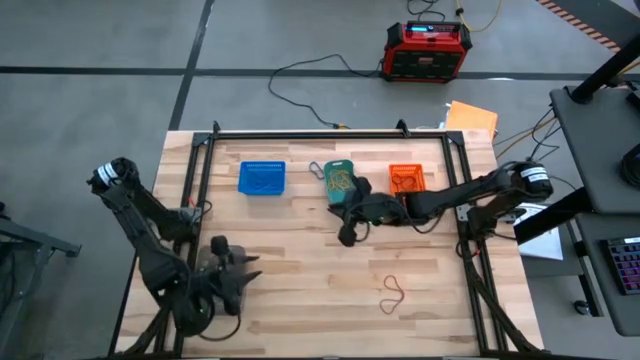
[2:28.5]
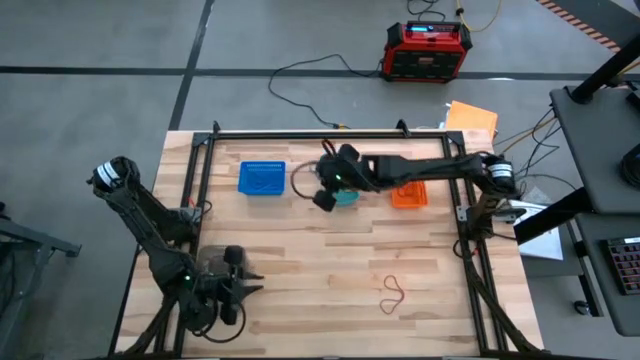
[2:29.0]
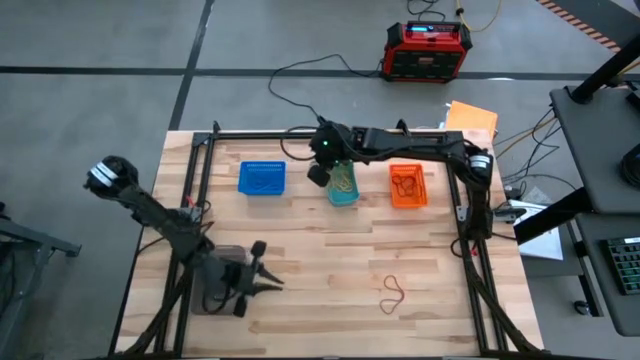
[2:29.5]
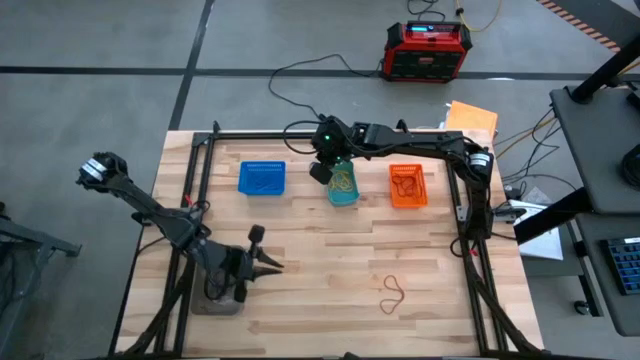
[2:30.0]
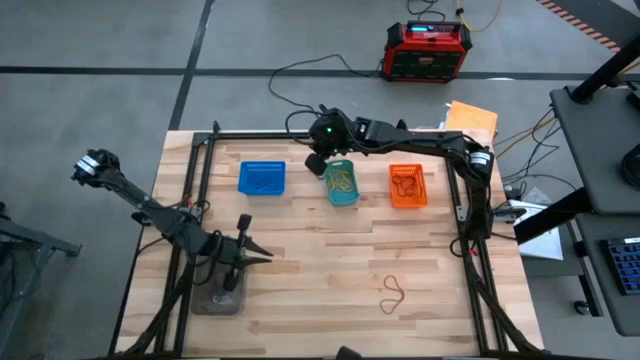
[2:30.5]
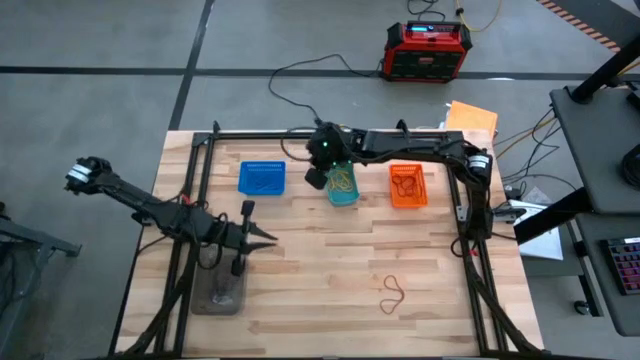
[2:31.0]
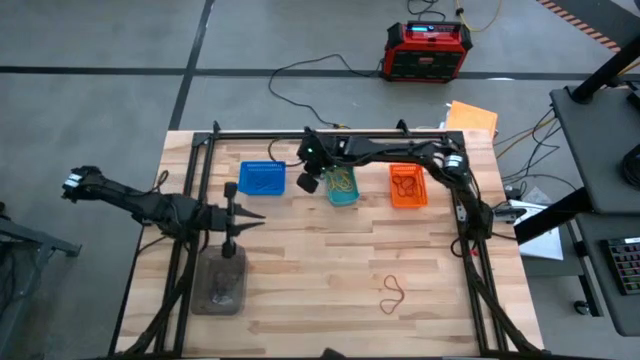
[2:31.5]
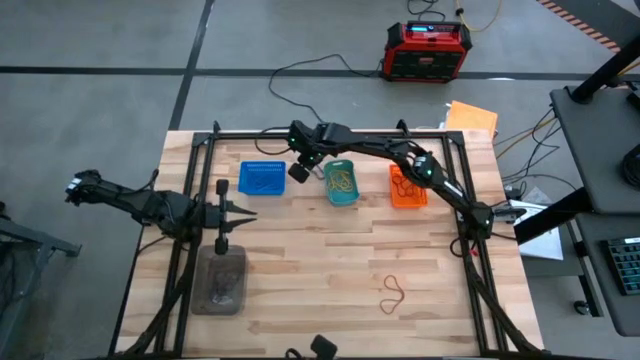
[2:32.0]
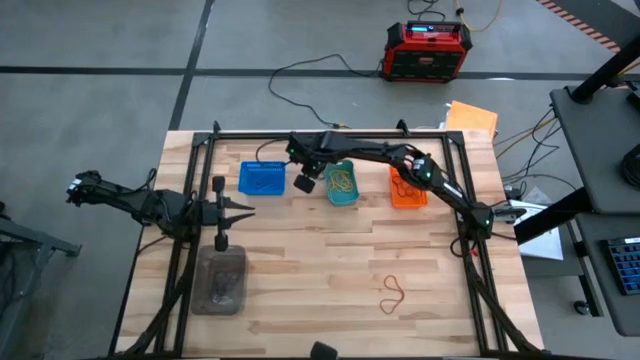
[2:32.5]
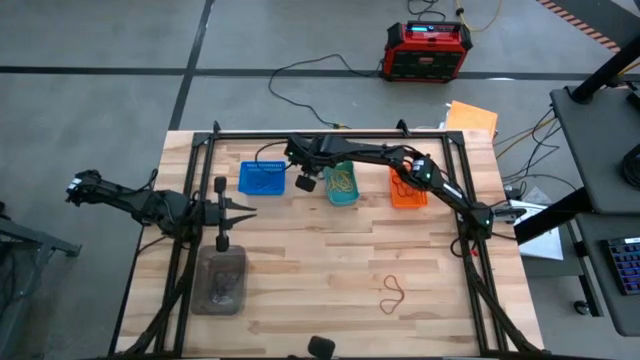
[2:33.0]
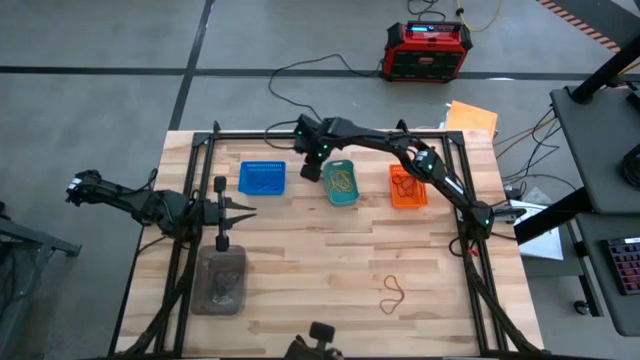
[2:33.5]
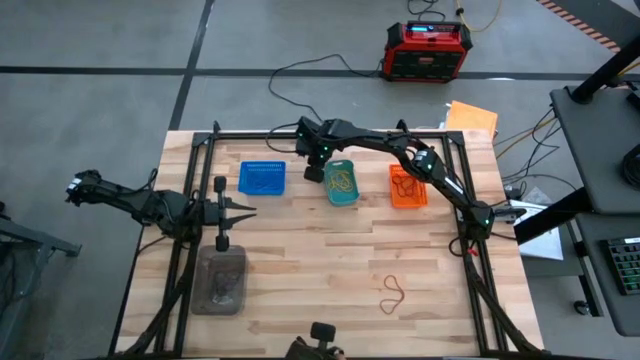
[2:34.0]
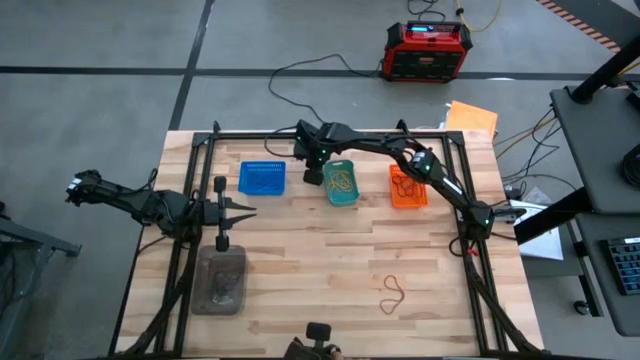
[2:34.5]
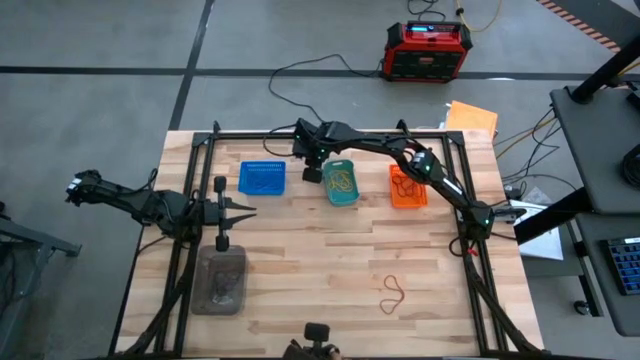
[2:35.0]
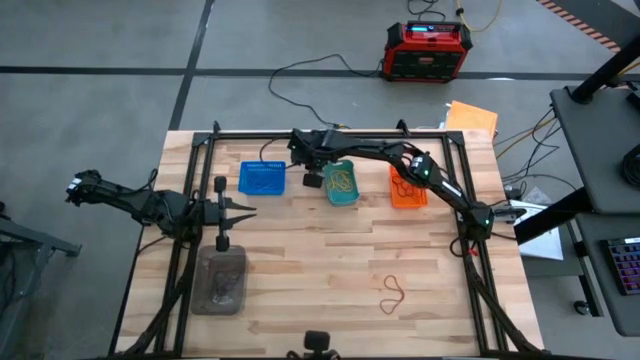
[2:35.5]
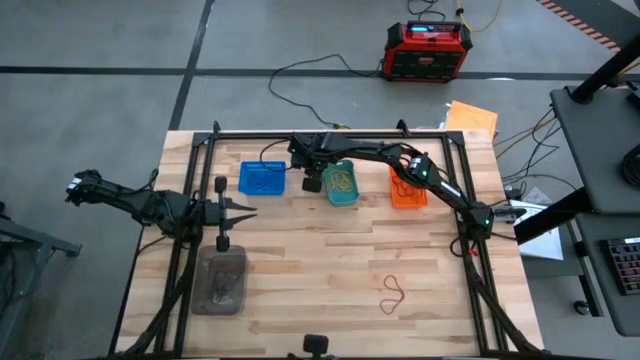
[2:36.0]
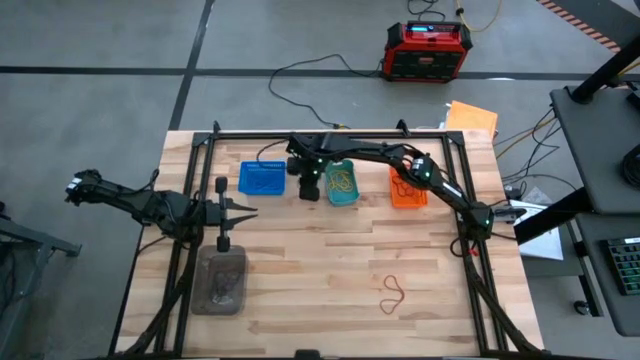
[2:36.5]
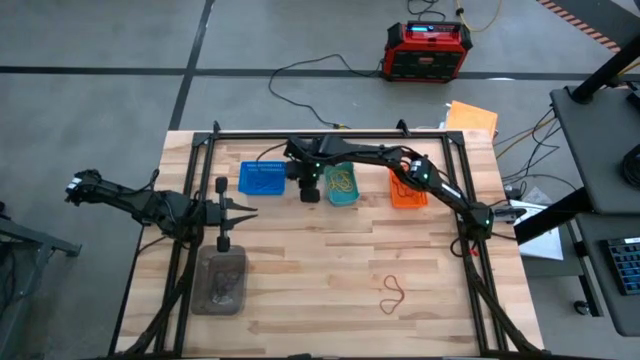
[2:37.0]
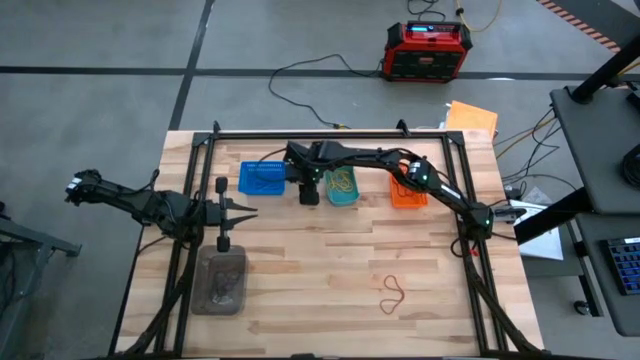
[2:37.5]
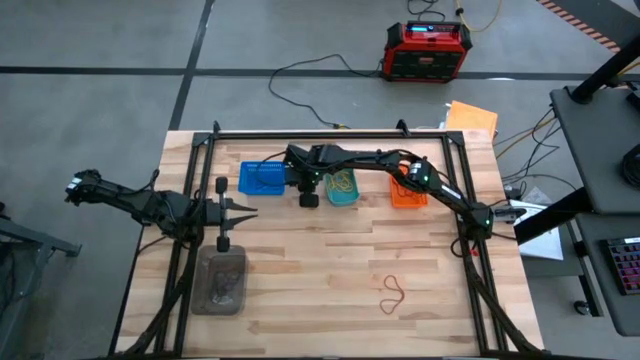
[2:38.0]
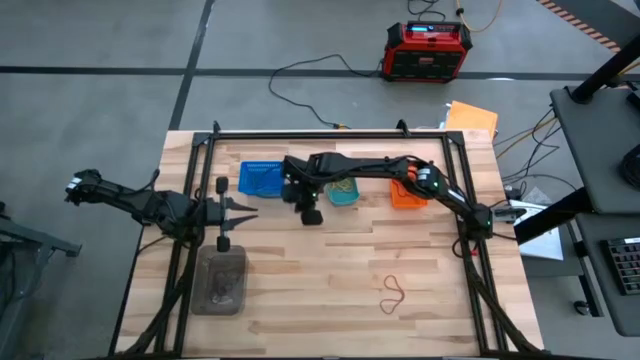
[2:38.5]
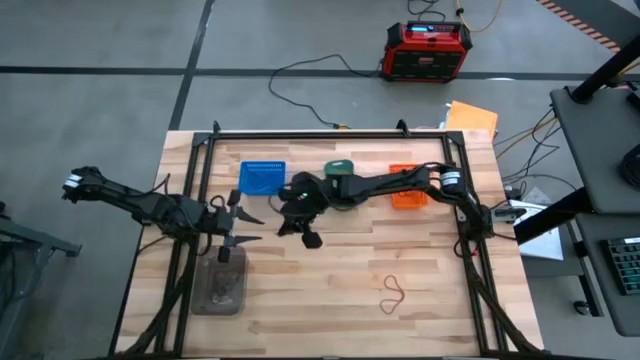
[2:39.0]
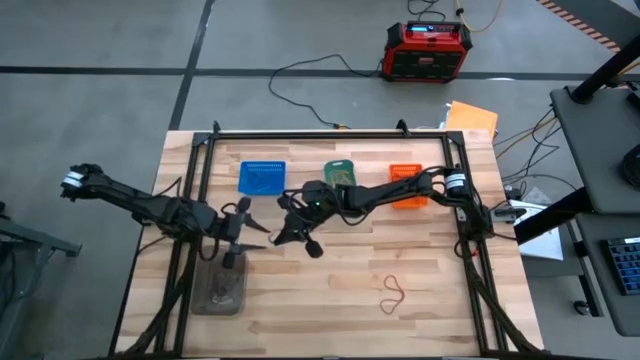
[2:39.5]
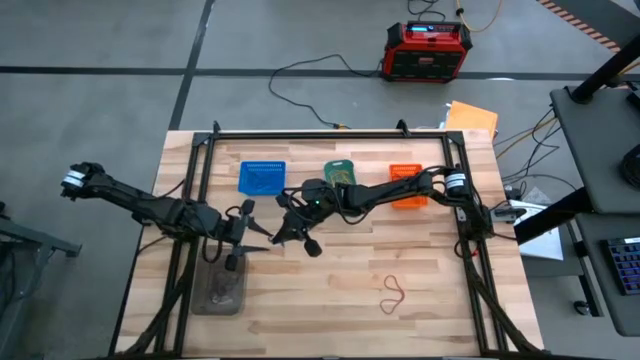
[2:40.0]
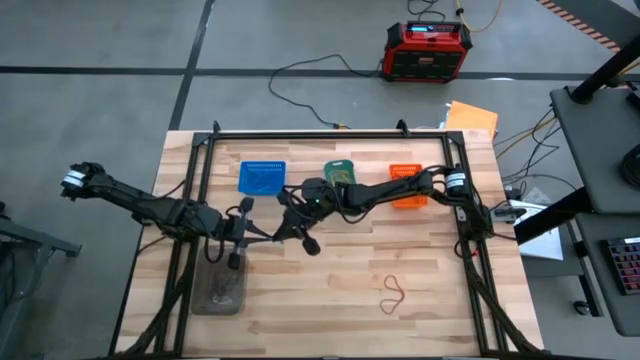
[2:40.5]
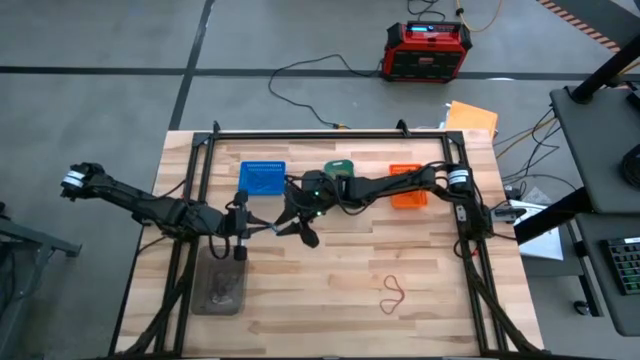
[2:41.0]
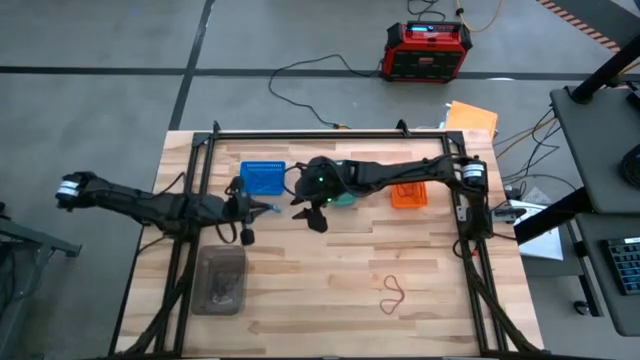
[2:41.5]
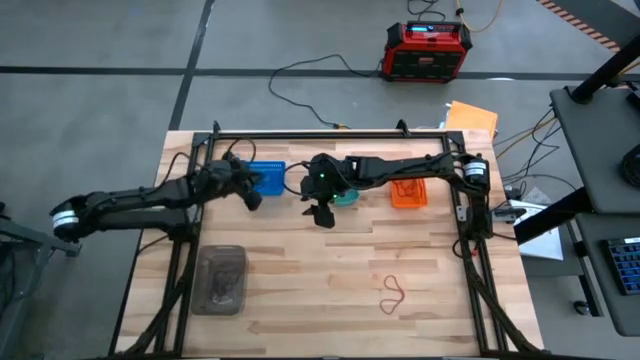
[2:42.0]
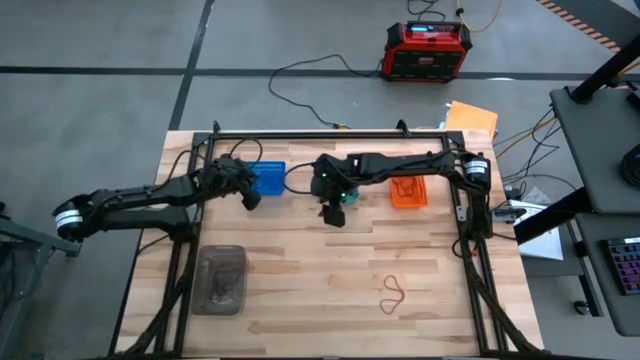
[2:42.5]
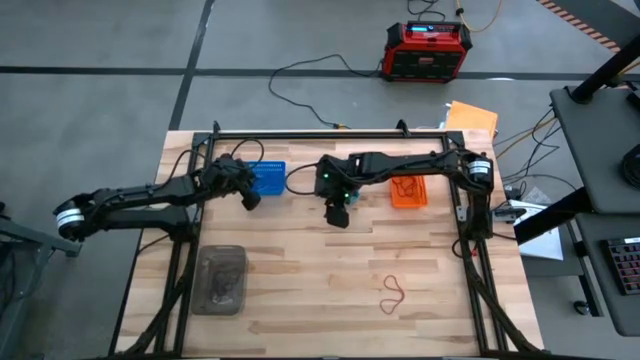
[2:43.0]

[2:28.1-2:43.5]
Task: Sort rubber bands into baskets
Put the top blue rubber band into the blue bin

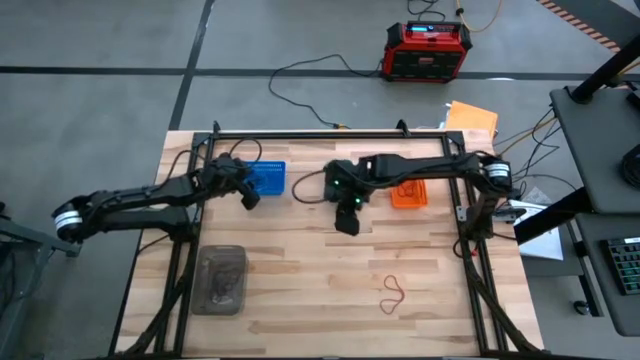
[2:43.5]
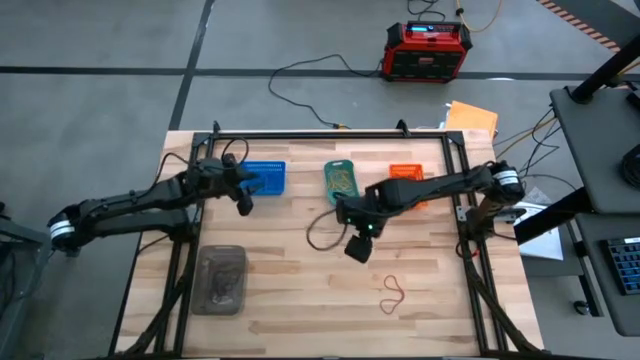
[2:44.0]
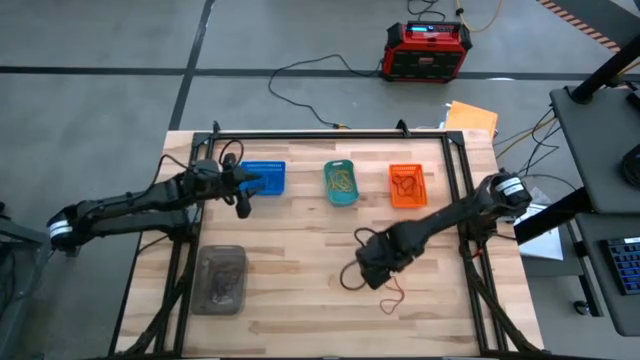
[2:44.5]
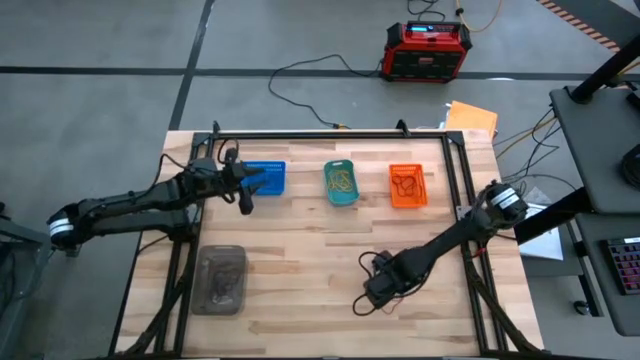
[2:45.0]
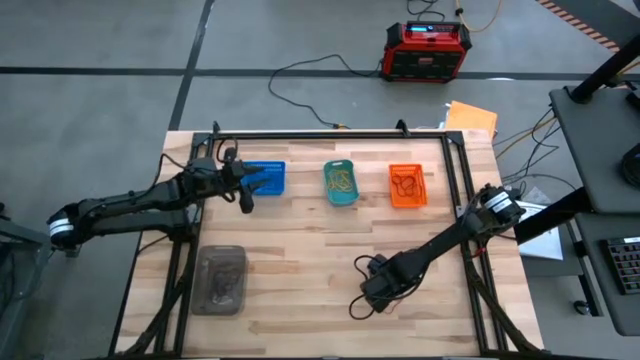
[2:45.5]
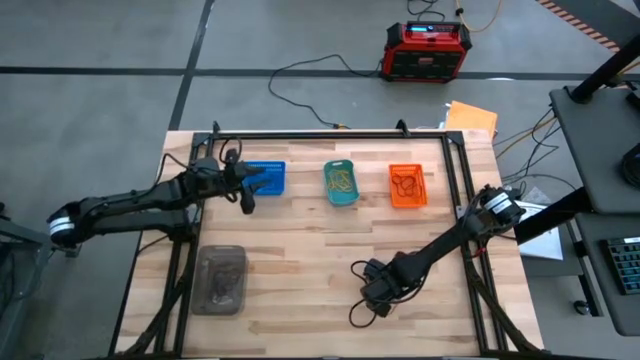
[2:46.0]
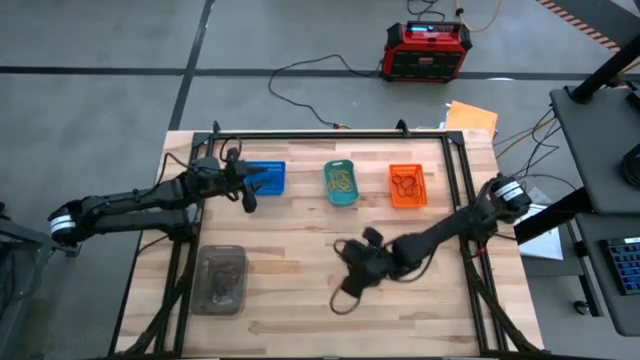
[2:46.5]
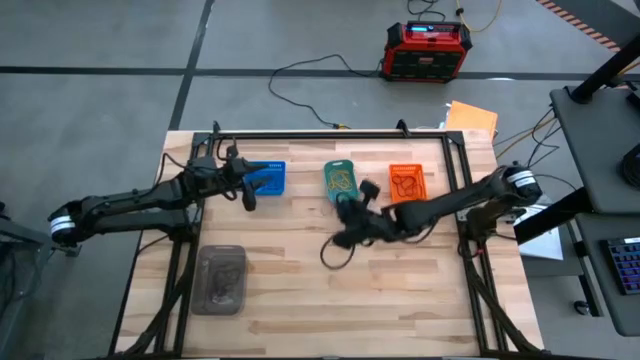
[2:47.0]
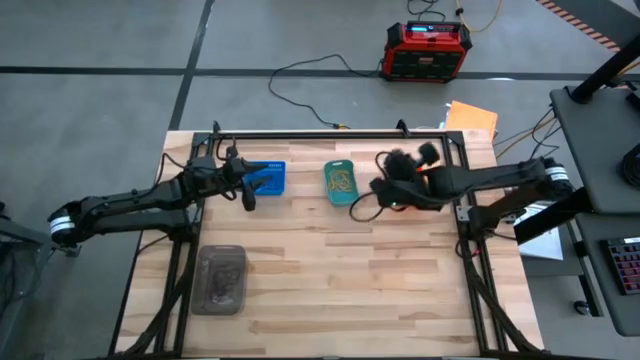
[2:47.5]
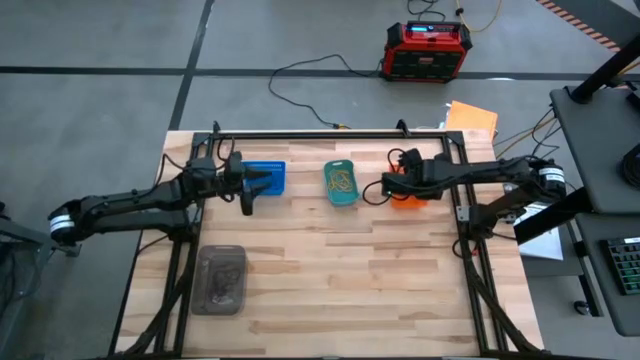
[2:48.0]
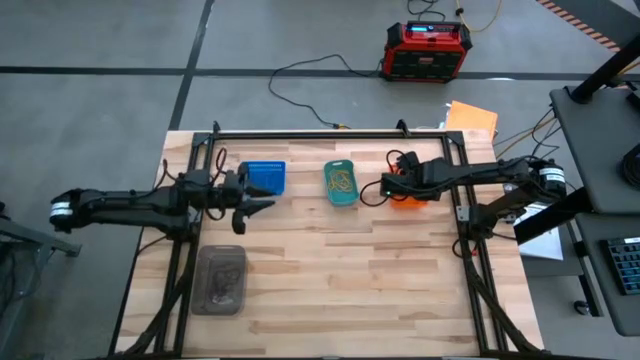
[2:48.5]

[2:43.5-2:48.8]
Put the red rubber band into the orange bin

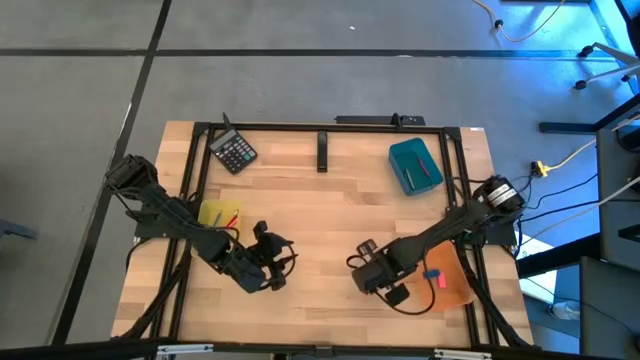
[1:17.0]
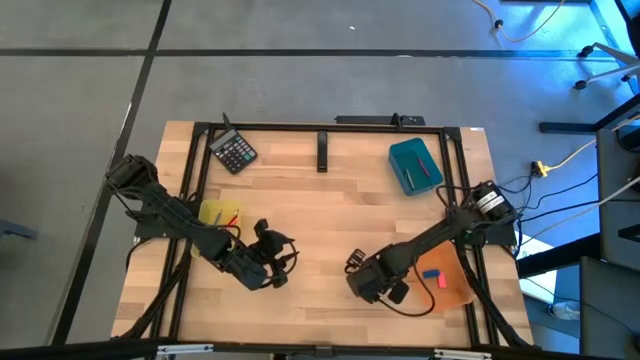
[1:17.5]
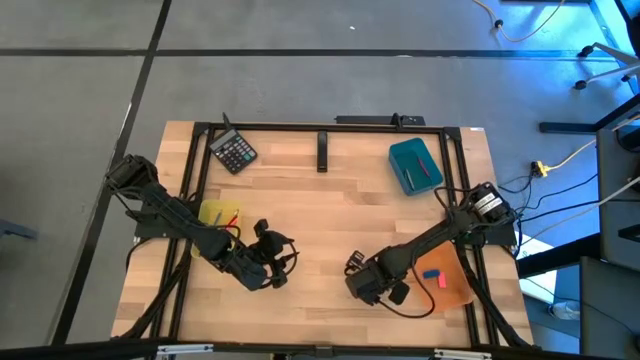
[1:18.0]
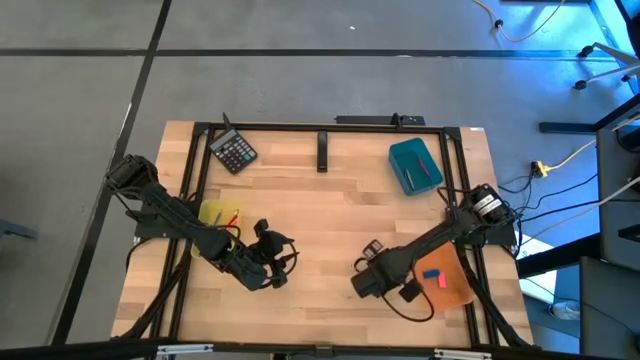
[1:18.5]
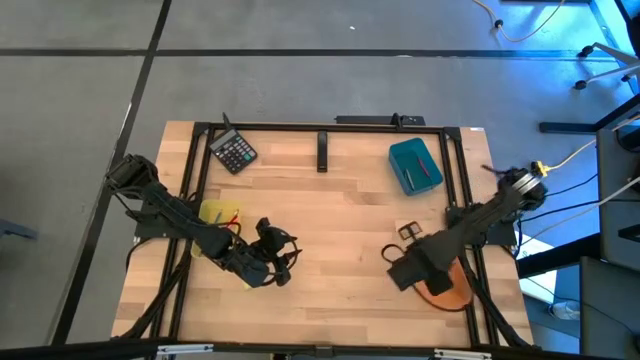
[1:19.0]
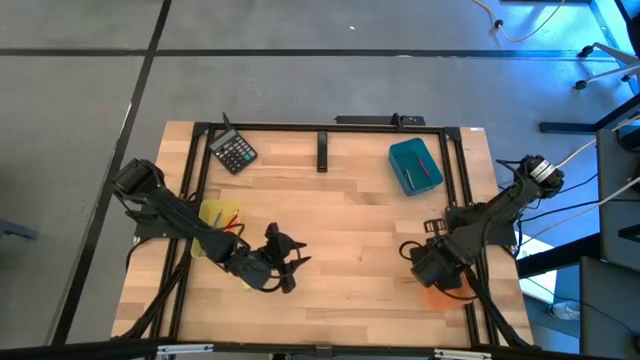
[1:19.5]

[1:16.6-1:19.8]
Task: Sort crayons/erasers/pens/pencils in bins
Put the red eraser into the orange bin
